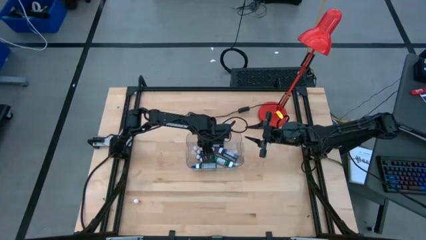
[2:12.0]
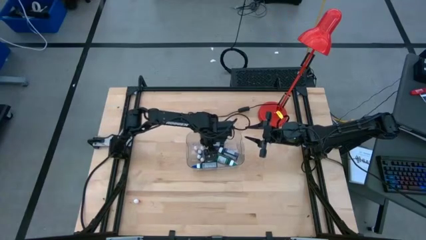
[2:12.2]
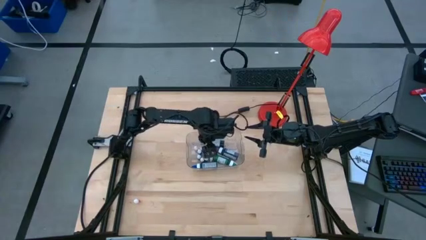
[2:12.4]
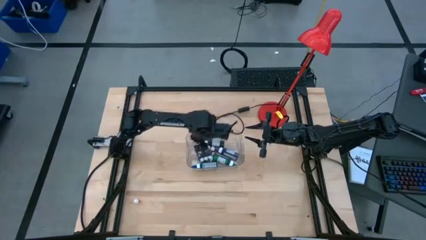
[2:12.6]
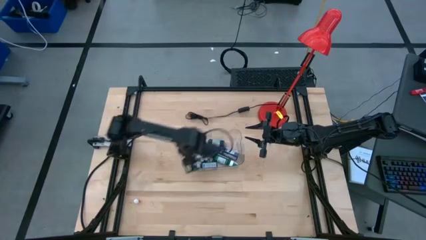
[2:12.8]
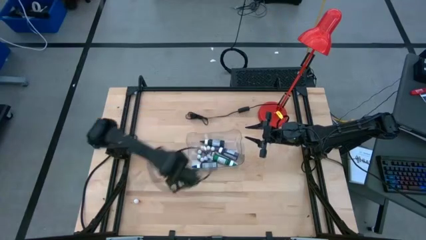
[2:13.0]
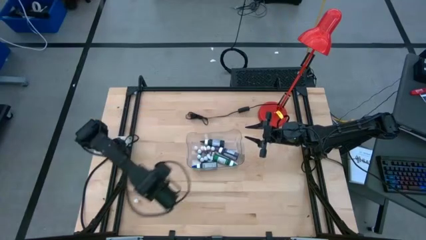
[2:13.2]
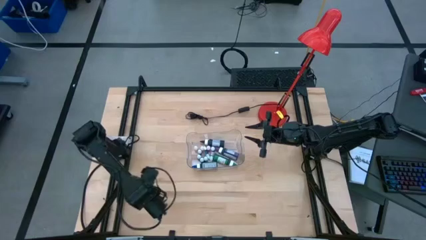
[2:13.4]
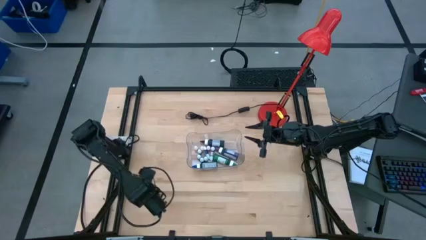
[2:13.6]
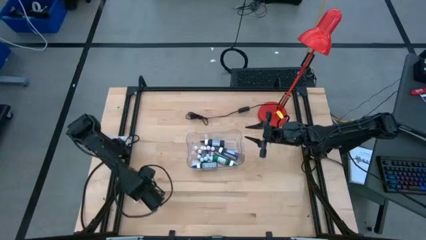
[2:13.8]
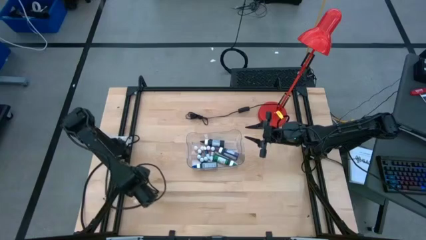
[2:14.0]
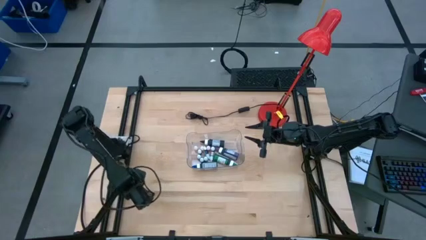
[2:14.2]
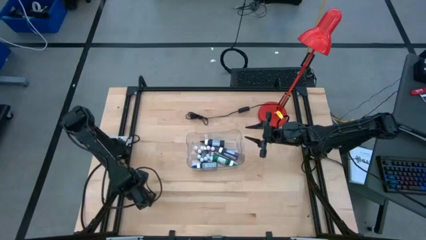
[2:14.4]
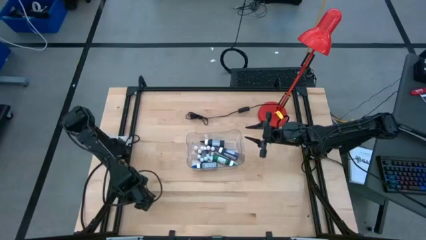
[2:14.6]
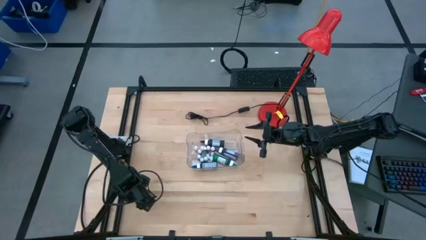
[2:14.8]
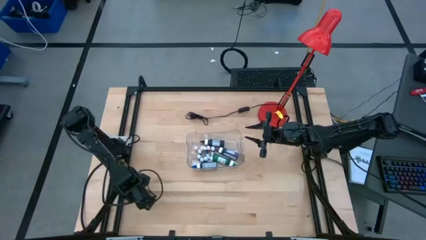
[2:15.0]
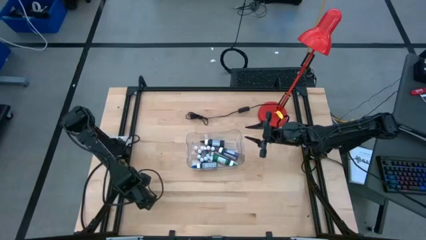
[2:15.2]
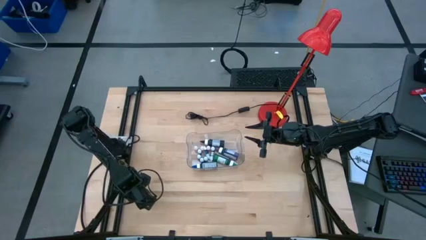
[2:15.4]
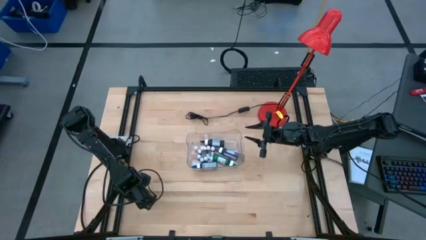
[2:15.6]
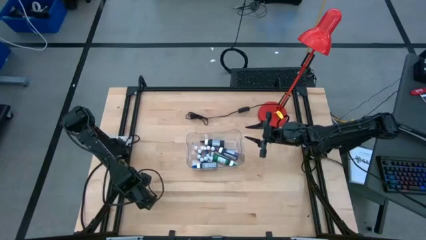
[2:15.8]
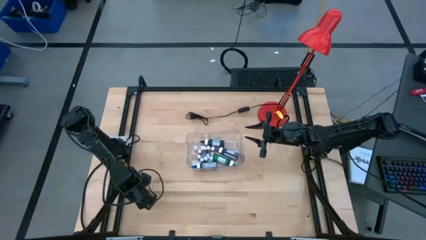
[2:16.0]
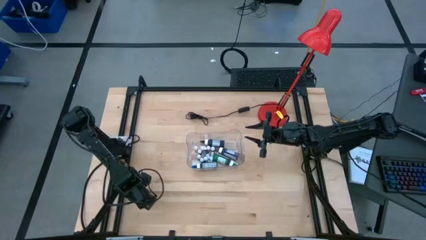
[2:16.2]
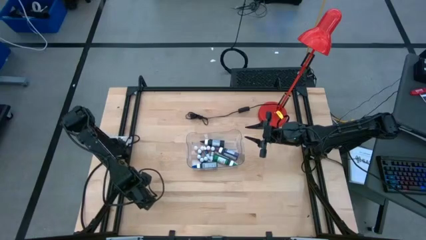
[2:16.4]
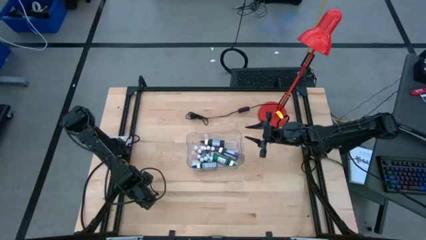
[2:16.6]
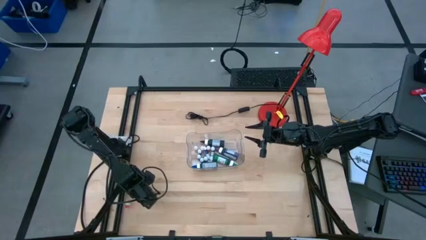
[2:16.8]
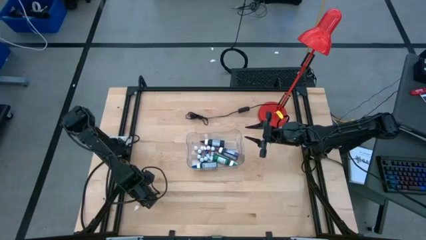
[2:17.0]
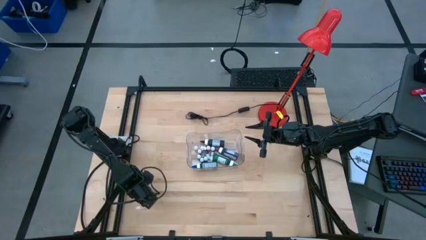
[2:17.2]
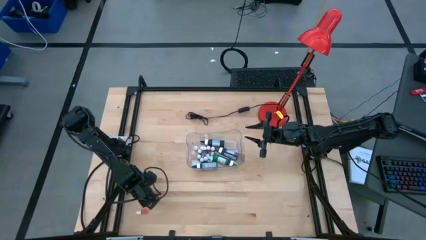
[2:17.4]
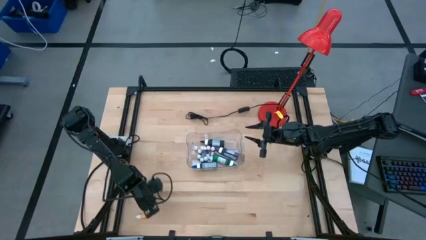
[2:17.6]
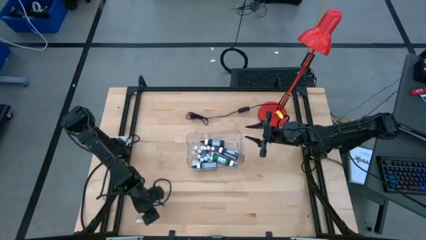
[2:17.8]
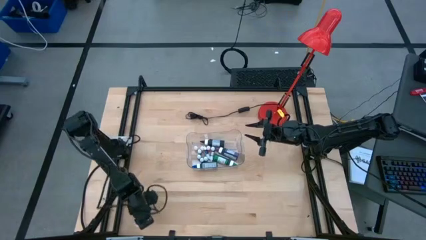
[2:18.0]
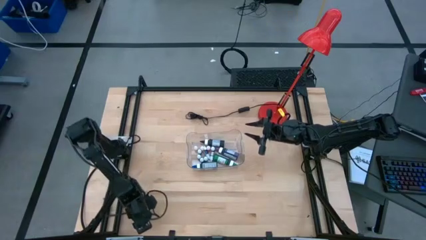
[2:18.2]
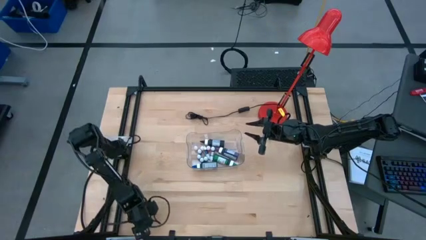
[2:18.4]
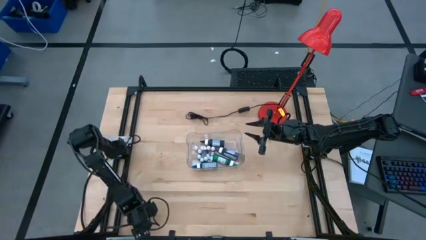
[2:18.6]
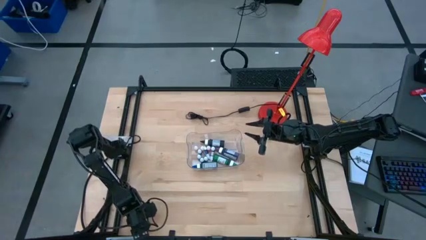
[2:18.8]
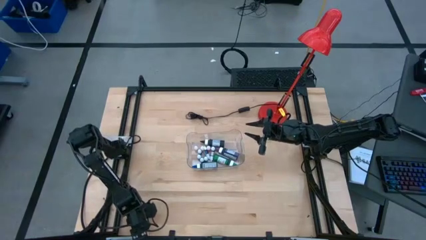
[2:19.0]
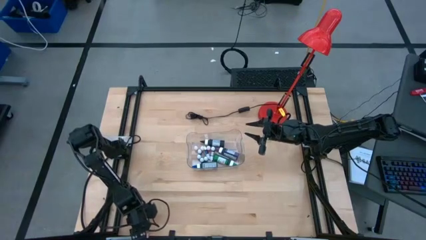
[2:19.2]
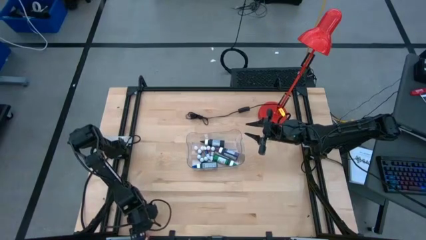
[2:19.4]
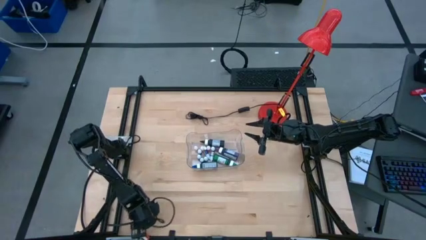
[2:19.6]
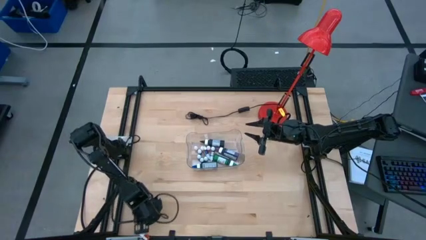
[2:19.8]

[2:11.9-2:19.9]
Task: Pick & Place food coloring
Put the small orange food coloring bottle into the transparent bin

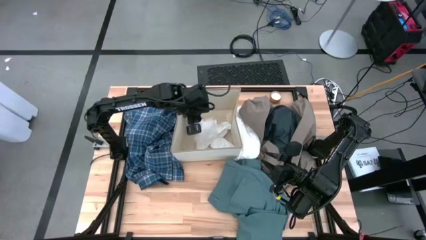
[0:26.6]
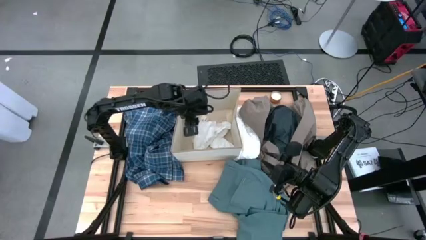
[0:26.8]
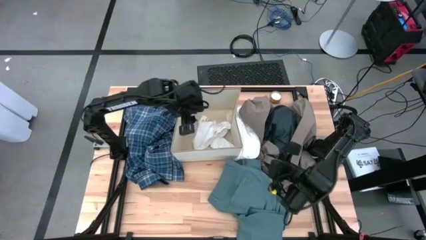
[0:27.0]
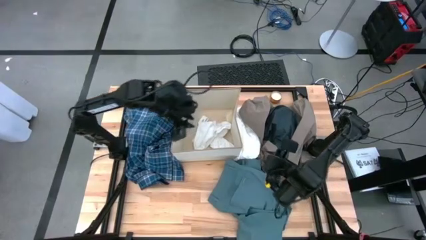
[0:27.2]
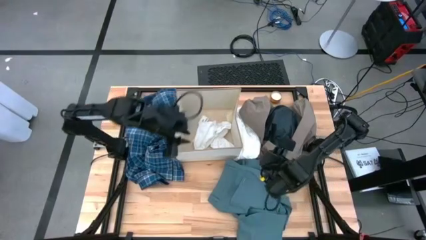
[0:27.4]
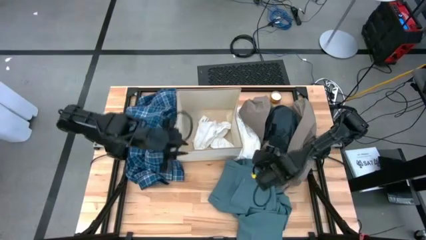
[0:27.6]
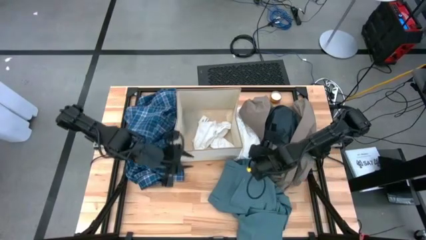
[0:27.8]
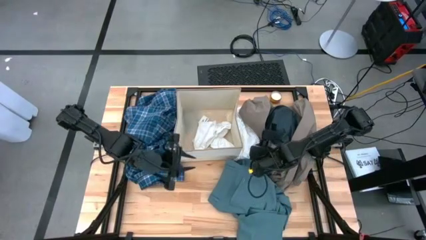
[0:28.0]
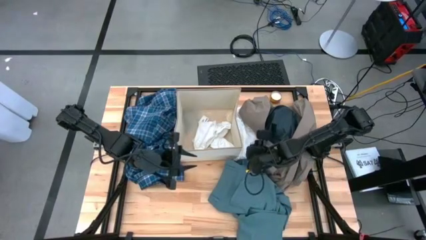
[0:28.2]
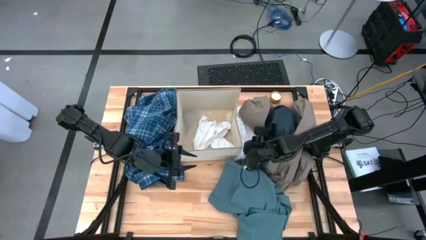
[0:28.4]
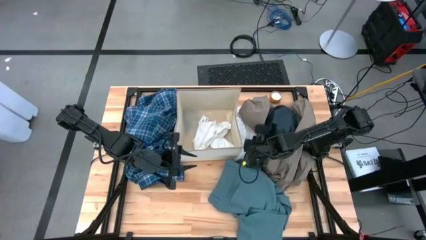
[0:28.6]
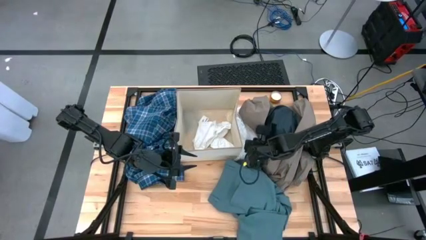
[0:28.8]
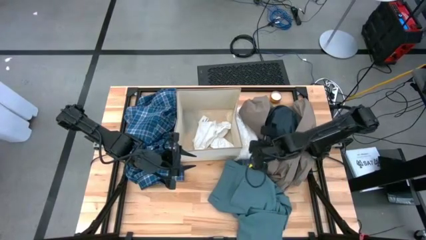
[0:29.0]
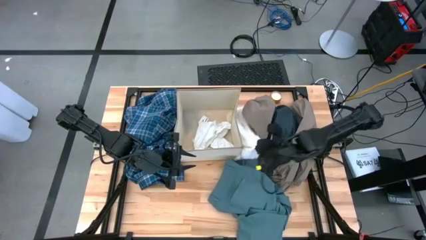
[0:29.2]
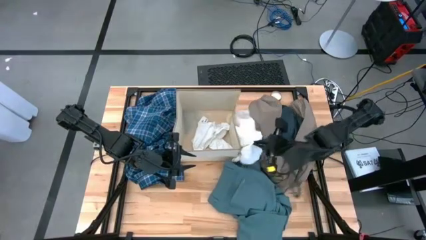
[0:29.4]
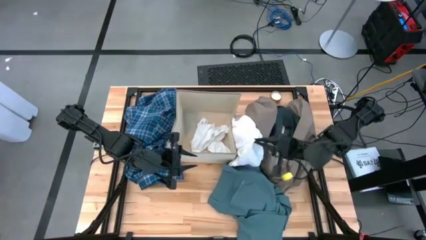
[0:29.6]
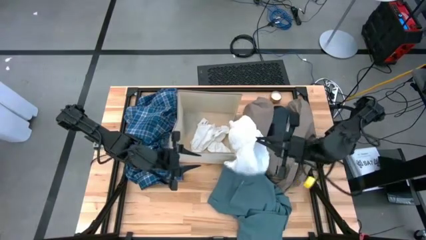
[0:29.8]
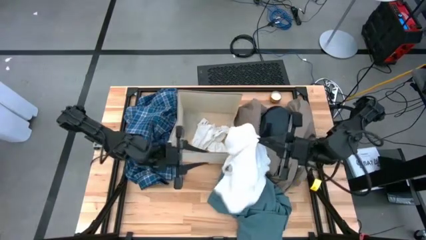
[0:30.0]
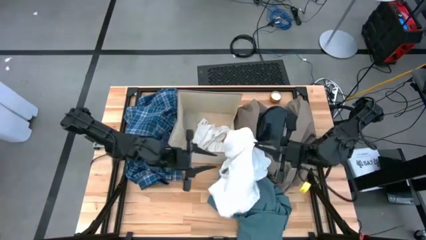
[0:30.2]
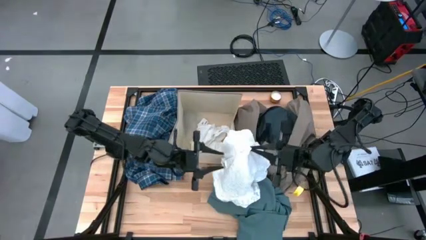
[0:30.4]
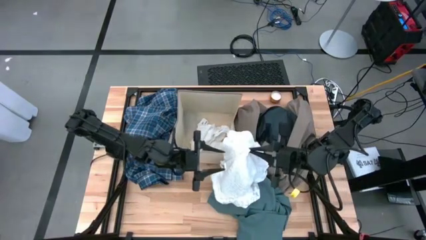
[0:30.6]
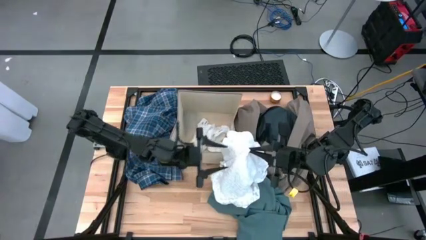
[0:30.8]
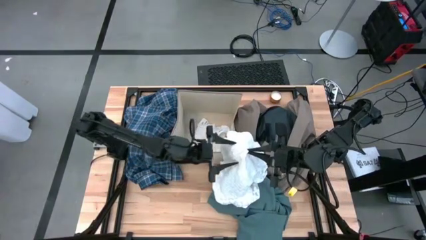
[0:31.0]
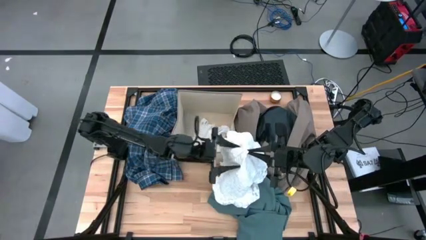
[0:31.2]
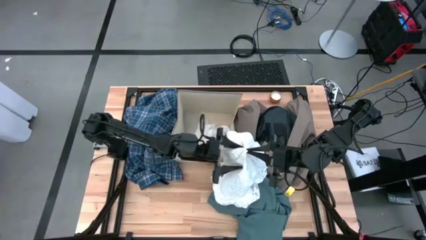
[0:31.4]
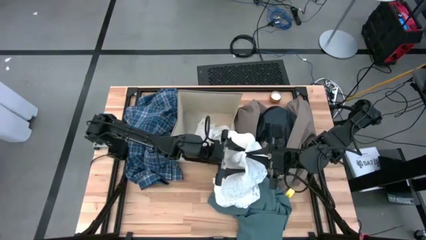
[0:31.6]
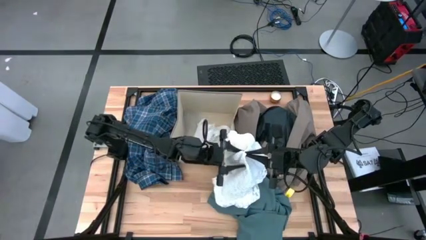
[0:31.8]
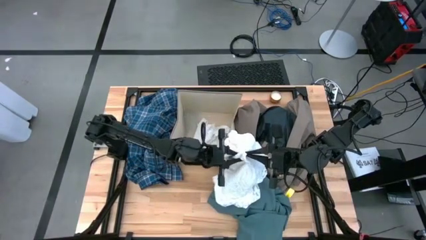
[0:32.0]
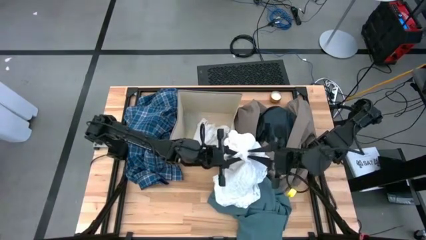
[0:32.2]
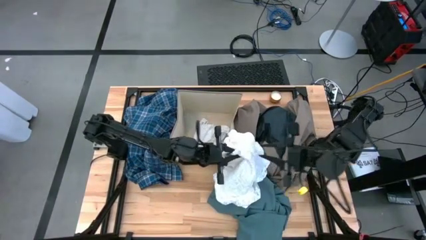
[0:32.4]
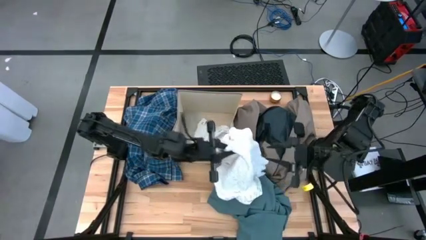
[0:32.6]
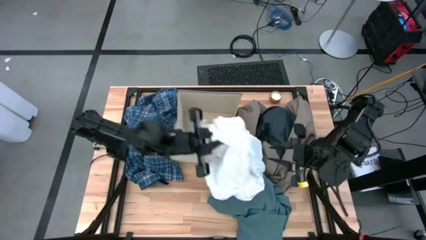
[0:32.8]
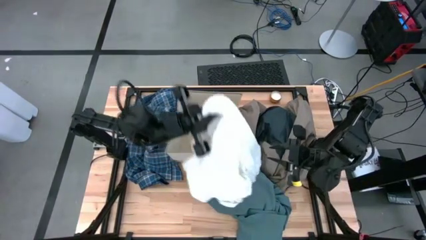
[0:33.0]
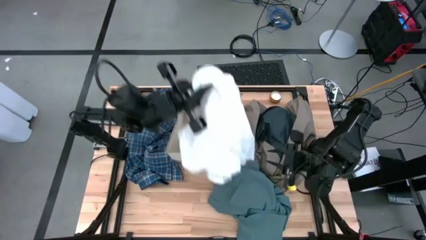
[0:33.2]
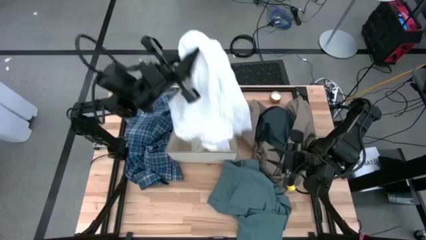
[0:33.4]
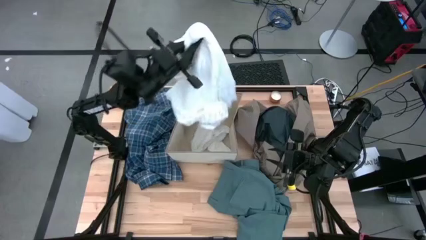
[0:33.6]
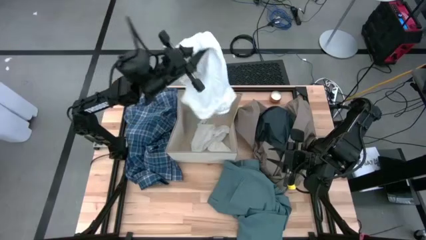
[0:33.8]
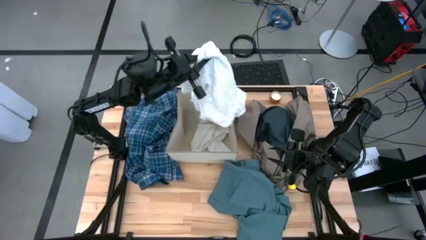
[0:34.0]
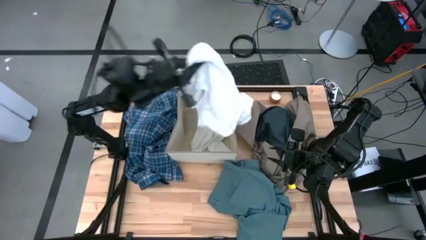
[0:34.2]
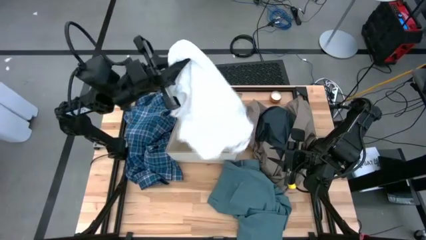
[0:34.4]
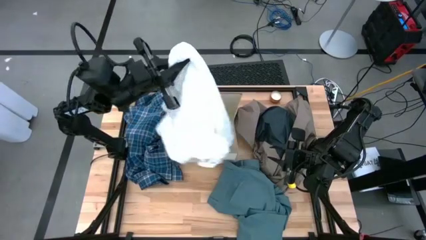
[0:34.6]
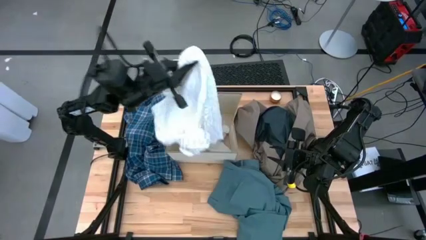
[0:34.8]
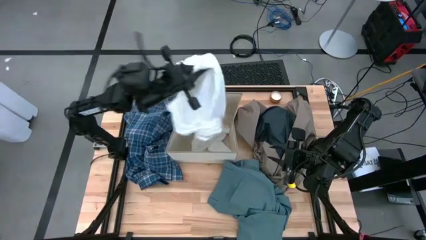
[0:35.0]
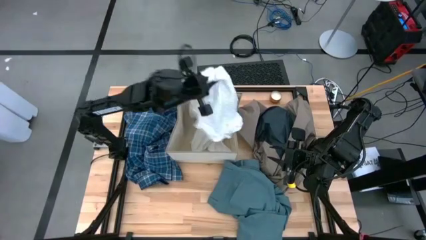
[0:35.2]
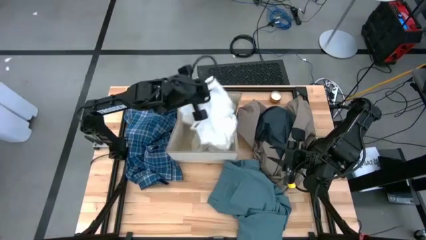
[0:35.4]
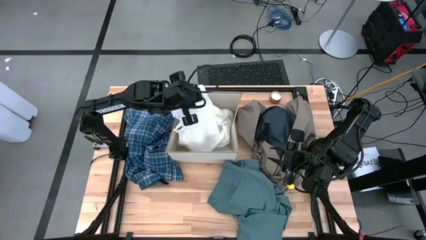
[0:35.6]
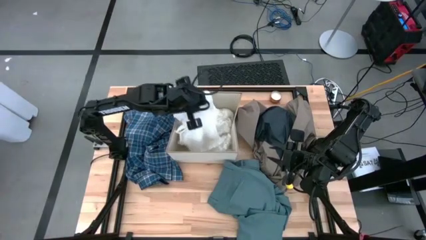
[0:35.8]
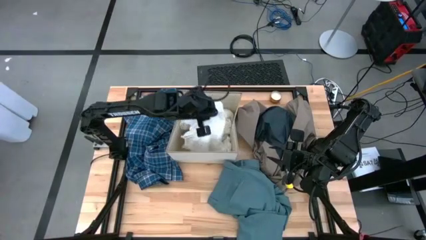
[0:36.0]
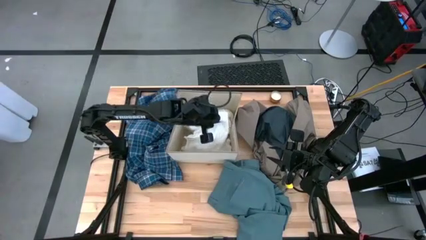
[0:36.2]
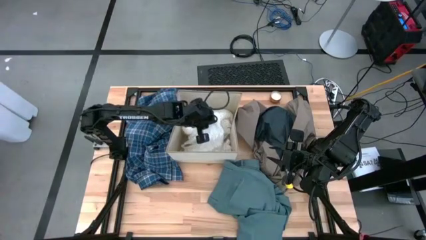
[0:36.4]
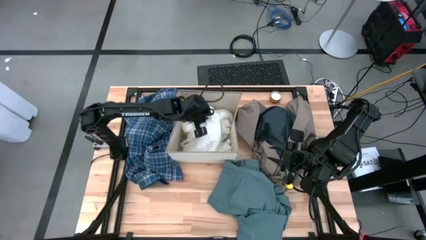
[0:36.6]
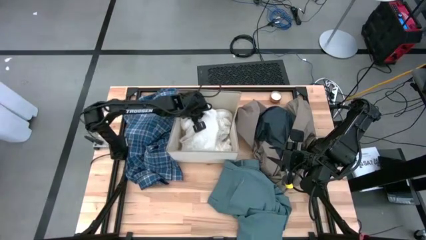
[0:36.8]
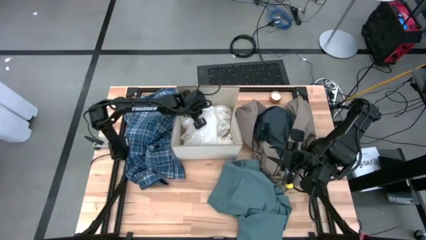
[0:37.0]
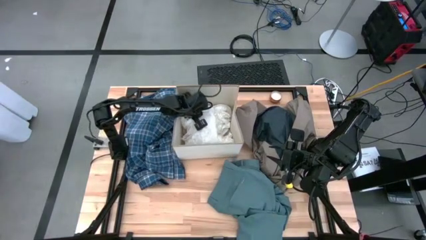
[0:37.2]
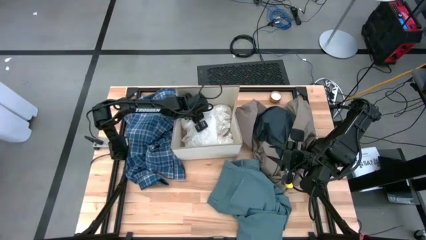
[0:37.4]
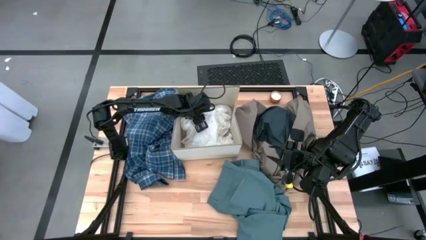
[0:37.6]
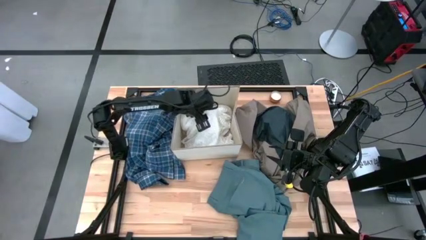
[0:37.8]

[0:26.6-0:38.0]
Task: Sort clothes
Put the white dress into the laundry organizer
